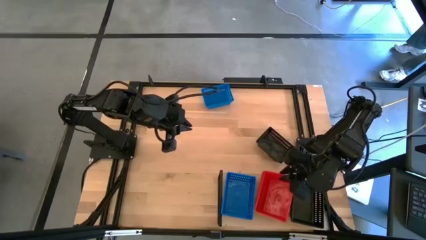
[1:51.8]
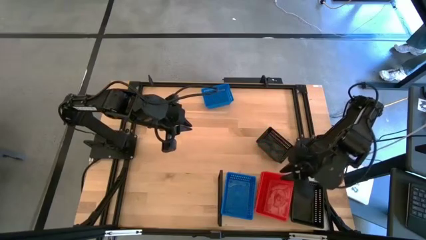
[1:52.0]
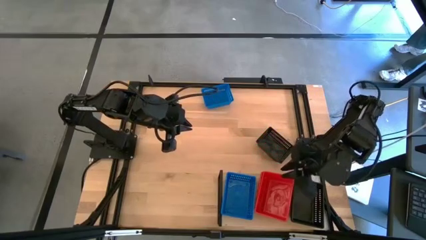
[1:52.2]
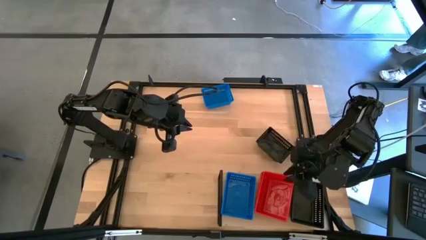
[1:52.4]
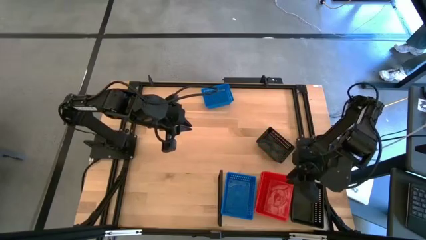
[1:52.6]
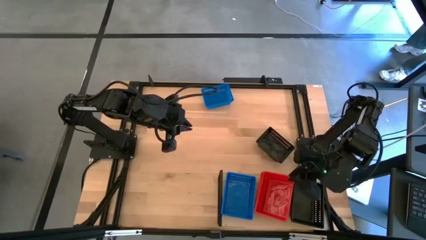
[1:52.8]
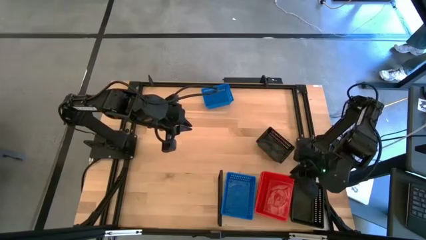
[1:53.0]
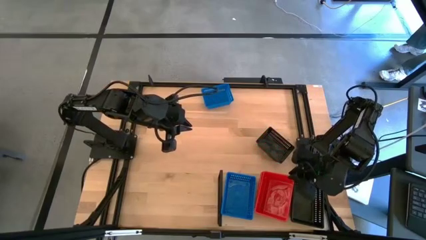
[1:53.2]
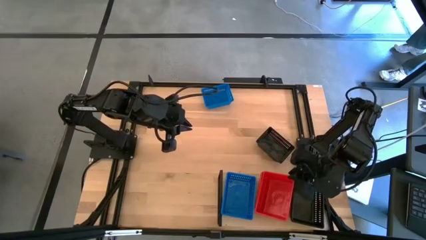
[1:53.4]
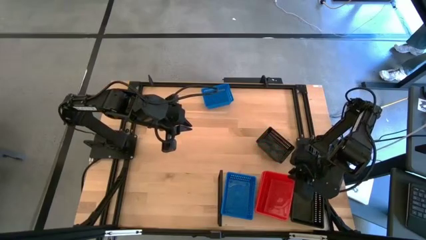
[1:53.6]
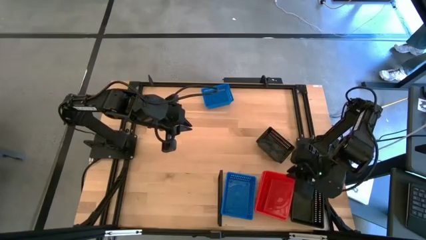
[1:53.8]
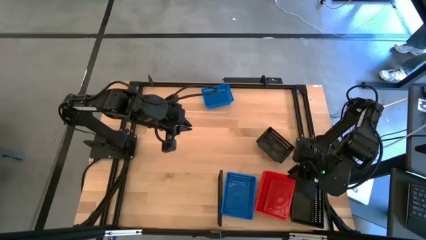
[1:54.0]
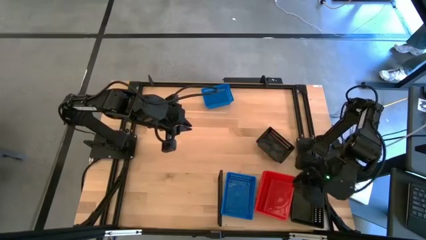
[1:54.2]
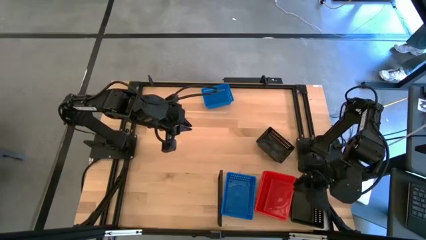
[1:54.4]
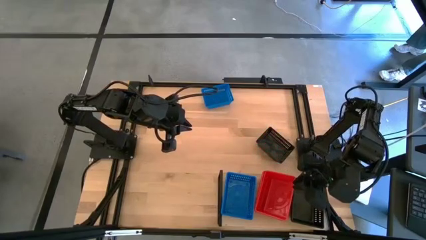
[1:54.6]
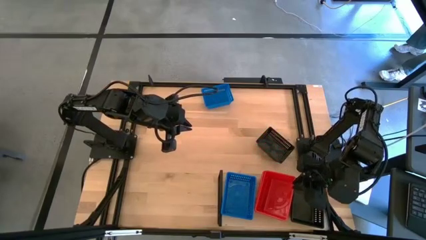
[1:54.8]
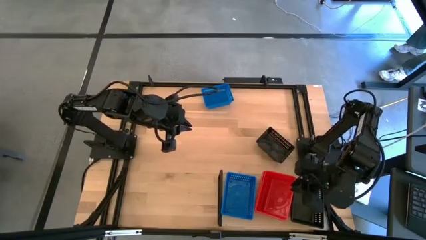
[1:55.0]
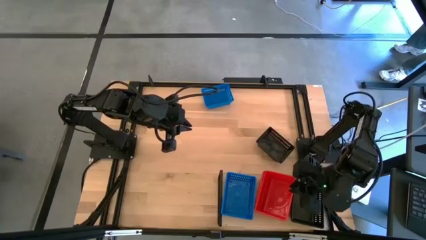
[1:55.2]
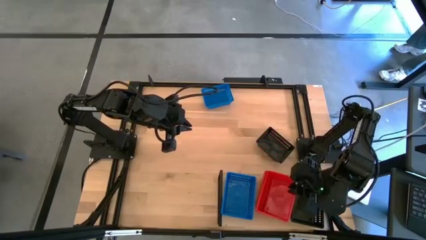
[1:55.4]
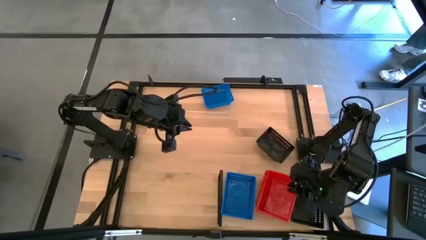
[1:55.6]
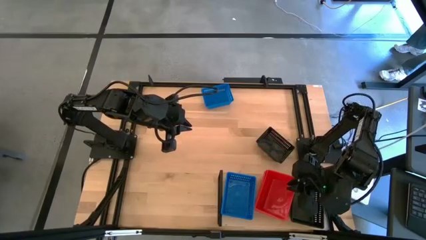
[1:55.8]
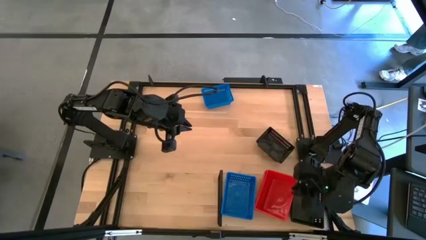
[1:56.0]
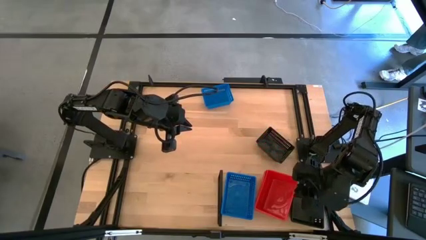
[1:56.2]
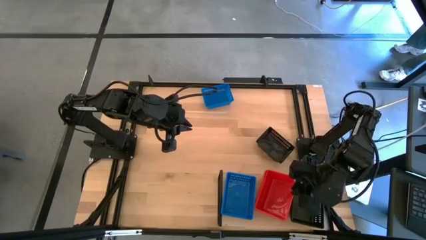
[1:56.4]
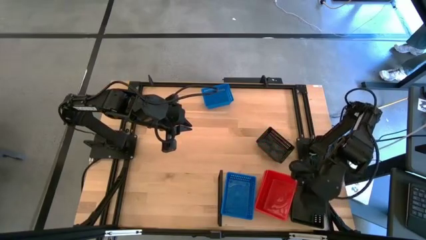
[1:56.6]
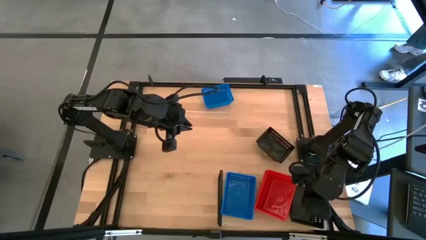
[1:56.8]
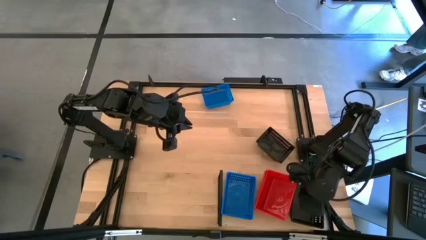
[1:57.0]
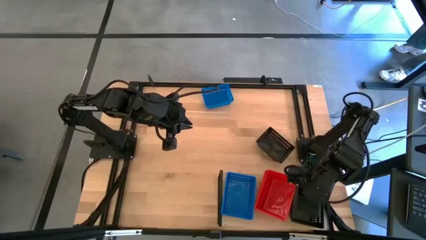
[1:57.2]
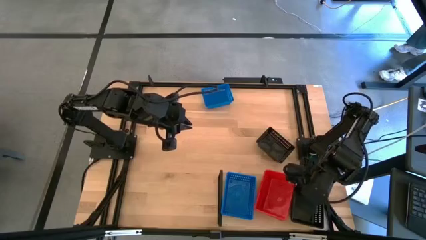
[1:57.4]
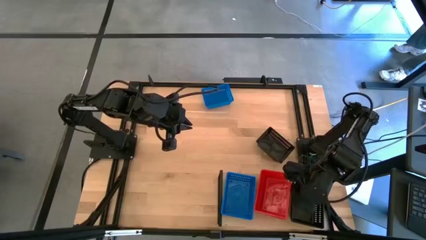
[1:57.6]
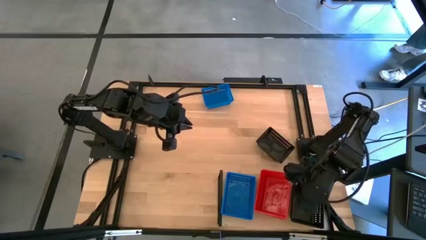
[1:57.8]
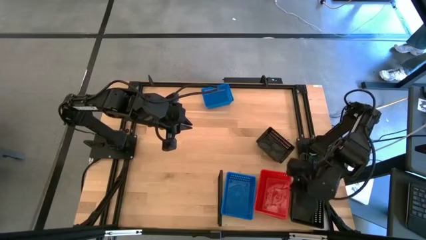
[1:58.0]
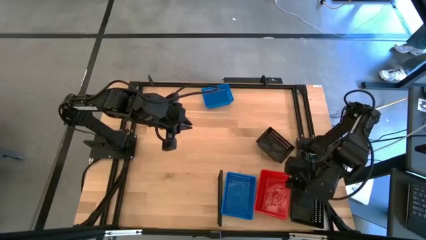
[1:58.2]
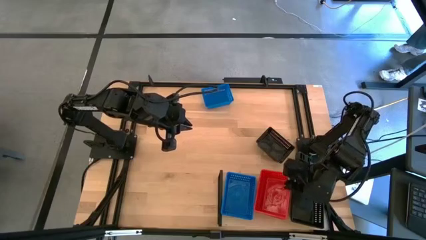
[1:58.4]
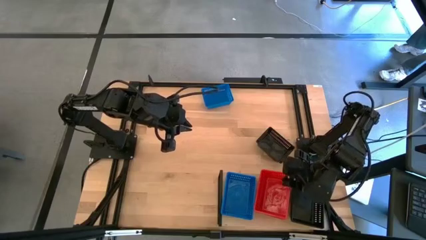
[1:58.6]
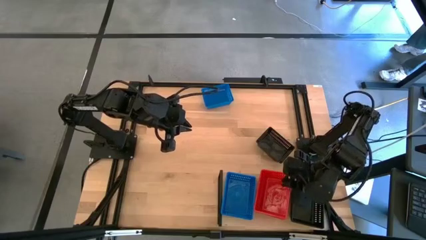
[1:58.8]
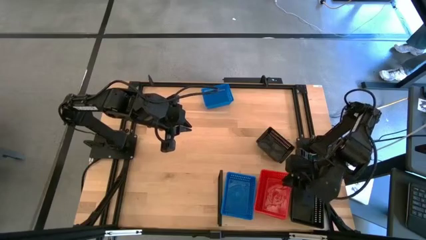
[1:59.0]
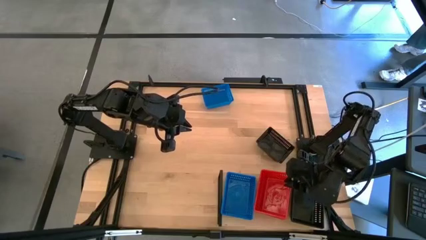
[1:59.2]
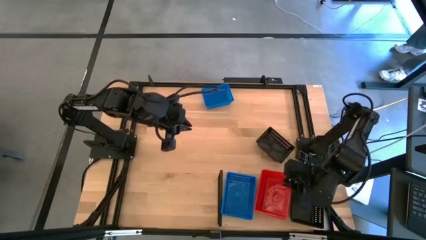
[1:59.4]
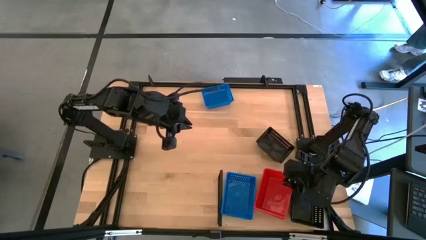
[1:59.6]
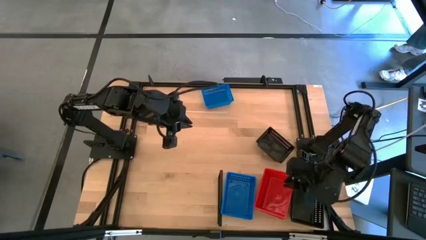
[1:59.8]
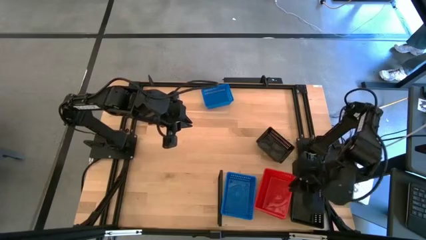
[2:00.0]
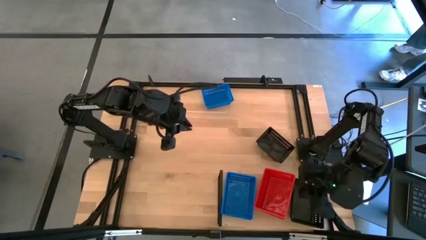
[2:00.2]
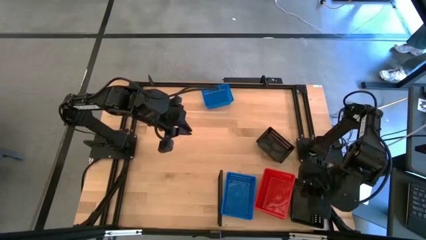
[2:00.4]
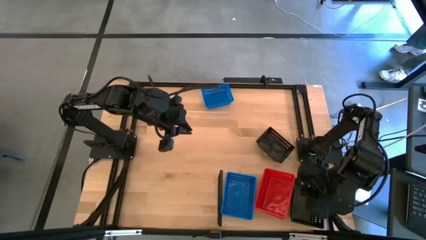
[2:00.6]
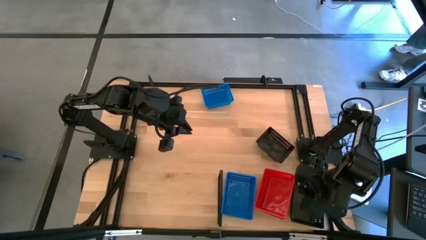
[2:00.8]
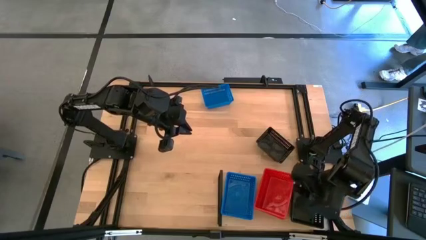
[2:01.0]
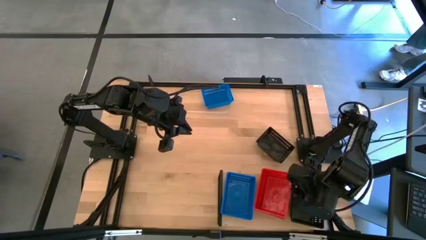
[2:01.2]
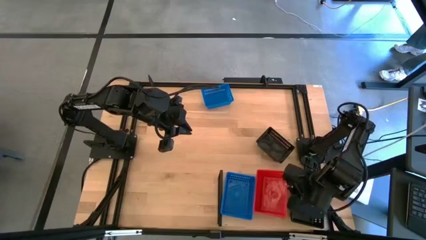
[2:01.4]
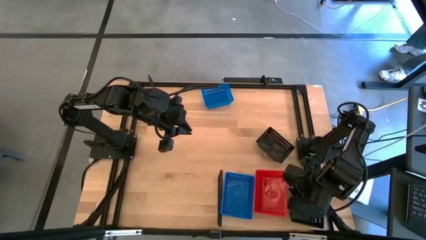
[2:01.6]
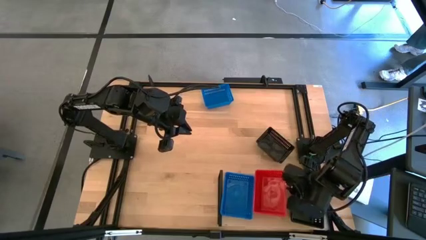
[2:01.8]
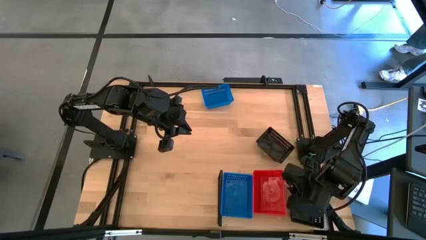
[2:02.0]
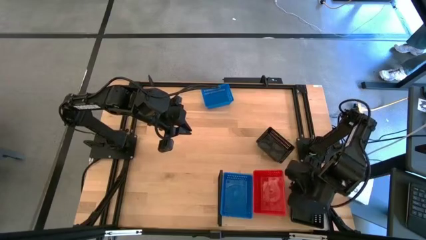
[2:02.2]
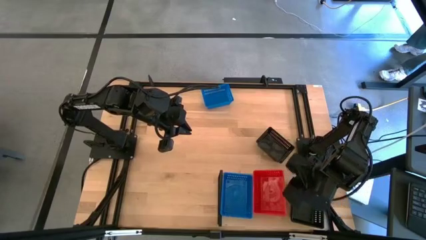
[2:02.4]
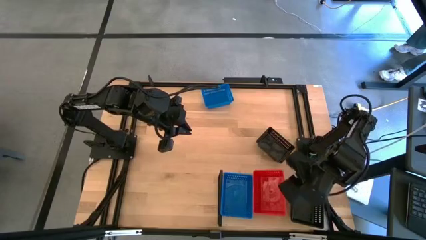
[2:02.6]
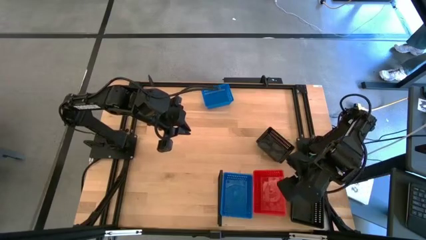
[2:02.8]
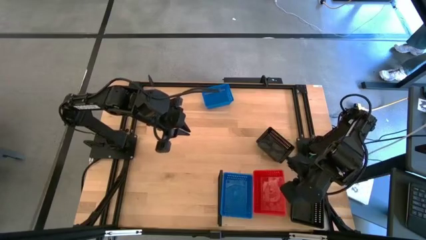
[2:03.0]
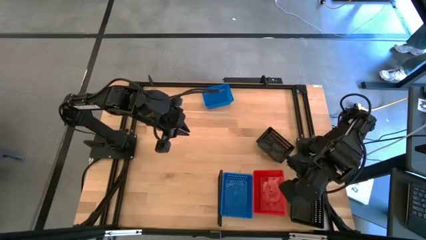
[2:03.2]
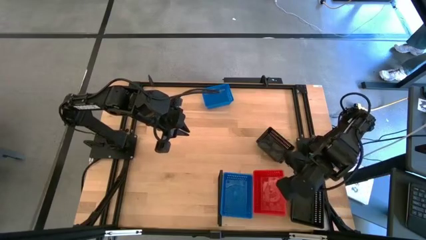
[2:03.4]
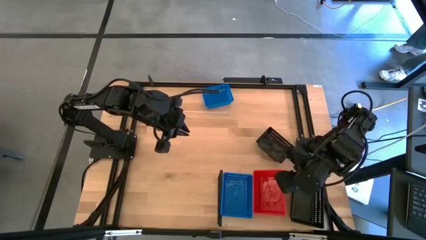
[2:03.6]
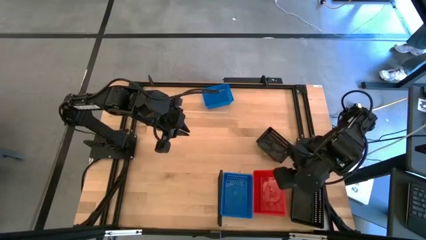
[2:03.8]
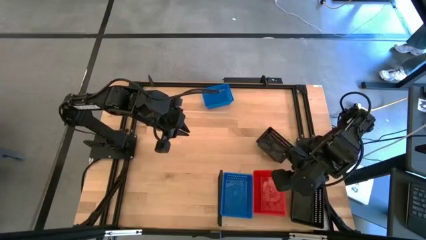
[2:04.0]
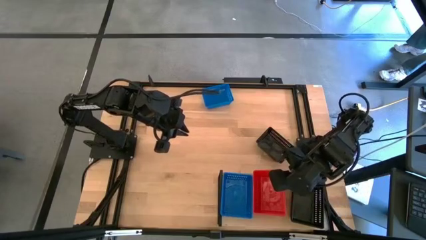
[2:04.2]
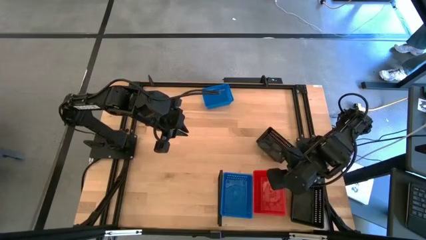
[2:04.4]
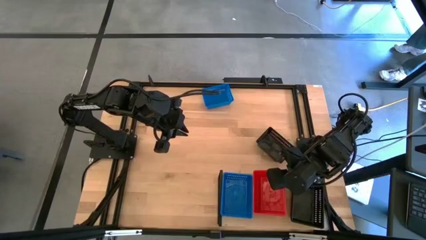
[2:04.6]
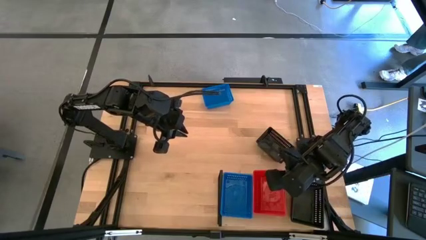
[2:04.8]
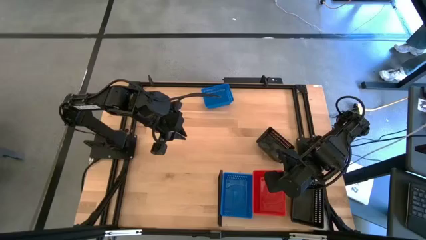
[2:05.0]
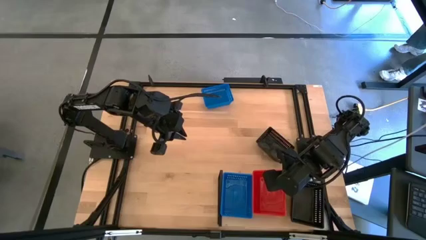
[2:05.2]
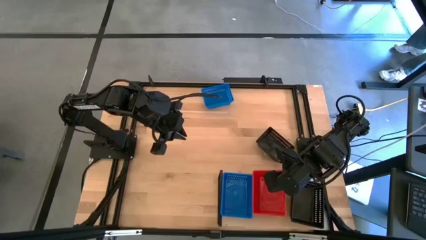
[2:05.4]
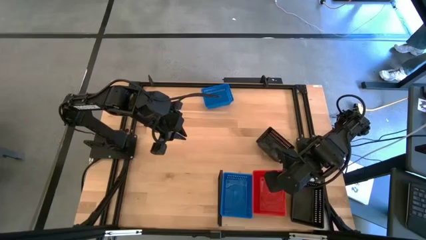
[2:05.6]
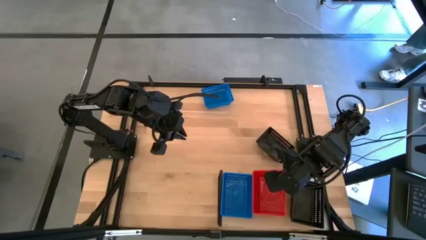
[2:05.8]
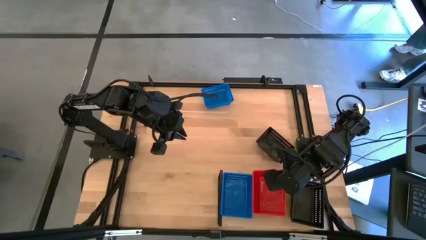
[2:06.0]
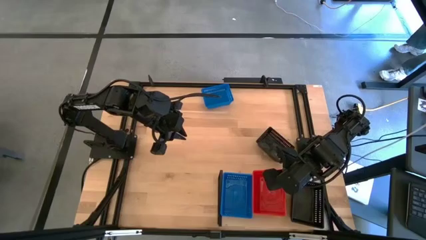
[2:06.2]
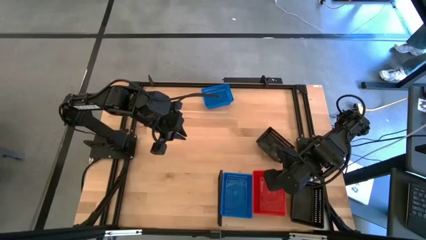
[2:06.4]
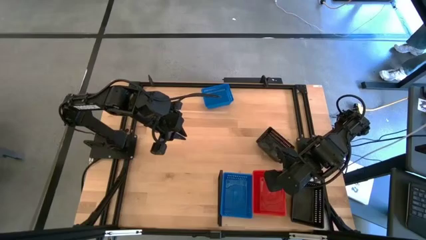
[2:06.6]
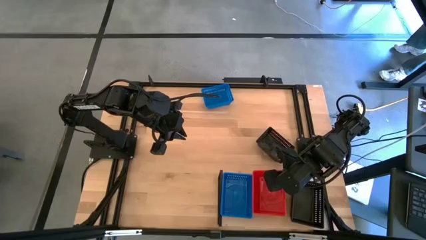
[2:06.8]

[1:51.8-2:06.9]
Task: Stack baskets on shelf by color
Stack the red bin on top of the red bins on the shelf

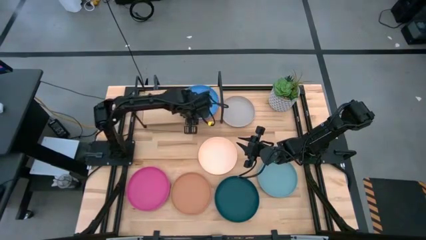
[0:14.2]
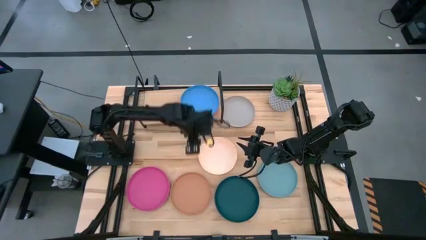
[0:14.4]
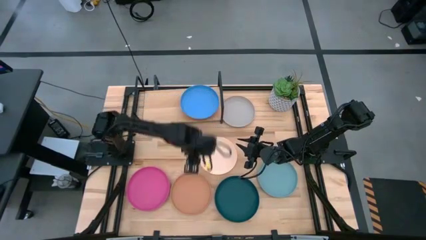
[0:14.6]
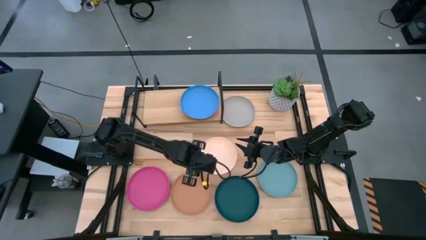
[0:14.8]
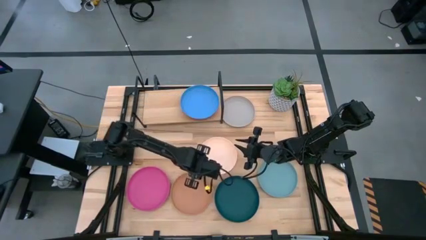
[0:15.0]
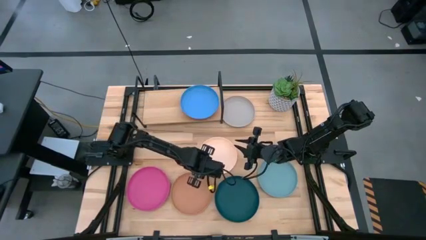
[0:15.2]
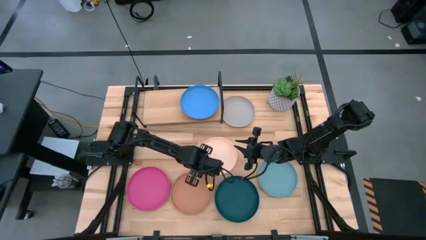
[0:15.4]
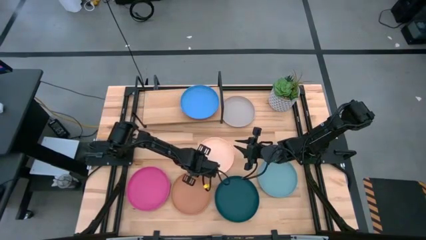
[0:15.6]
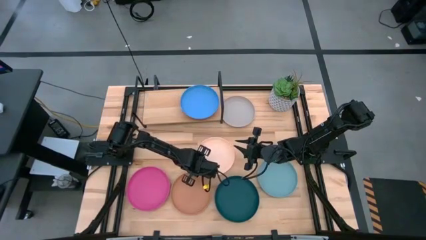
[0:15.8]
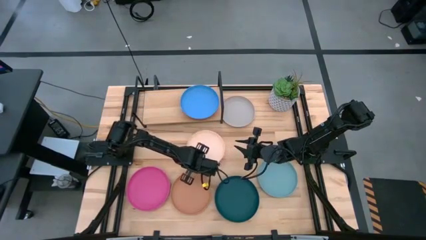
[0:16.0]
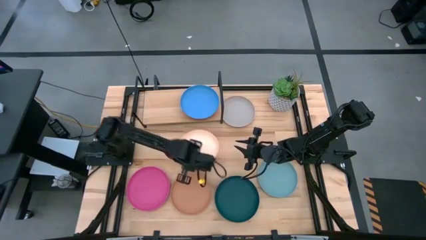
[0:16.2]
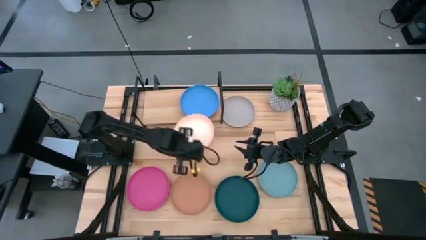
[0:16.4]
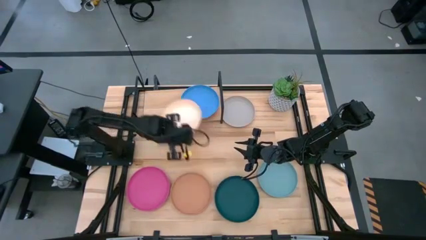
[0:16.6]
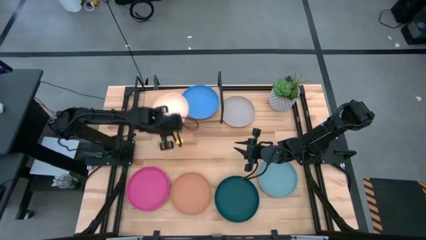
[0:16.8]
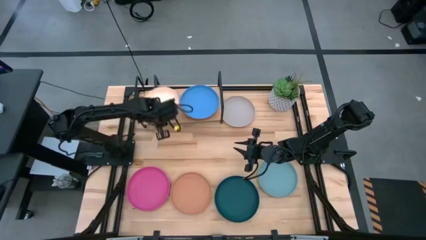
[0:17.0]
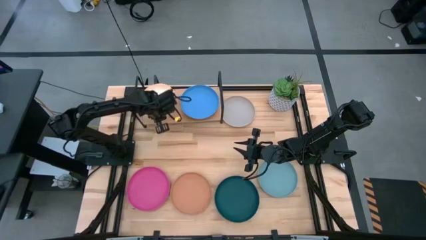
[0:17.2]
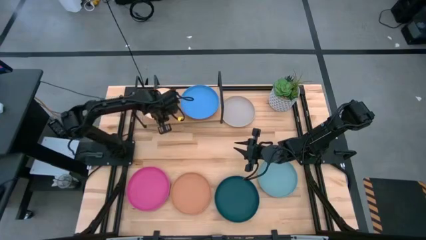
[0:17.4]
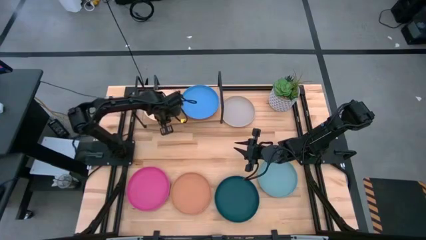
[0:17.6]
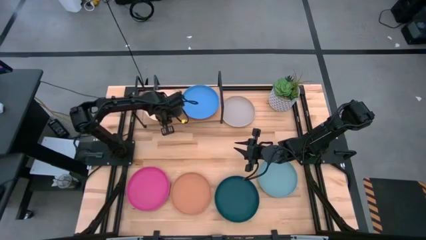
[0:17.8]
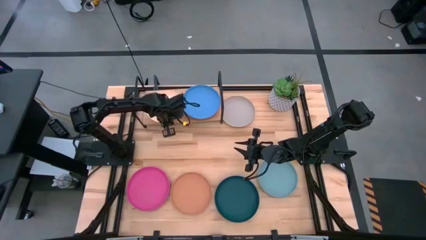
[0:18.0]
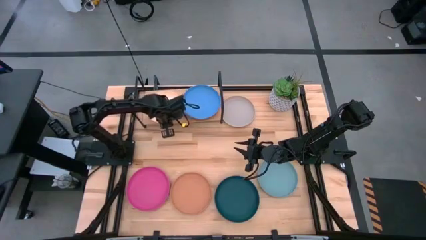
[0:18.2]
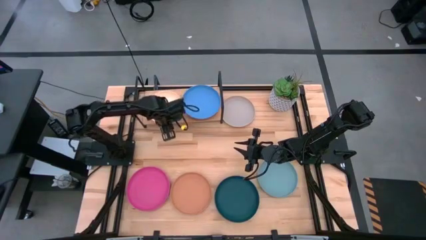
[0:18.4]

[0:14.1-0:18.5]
Task: Place and stack plates onto a shelf
Put the white plate on the shelf
